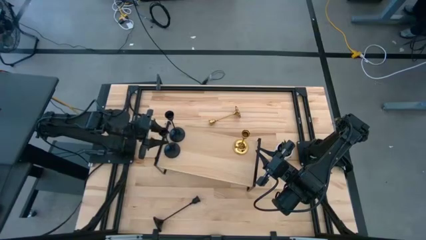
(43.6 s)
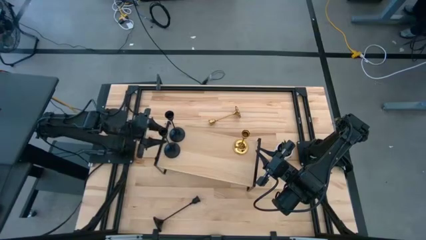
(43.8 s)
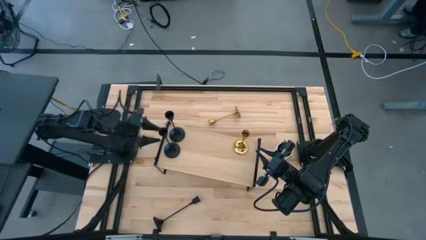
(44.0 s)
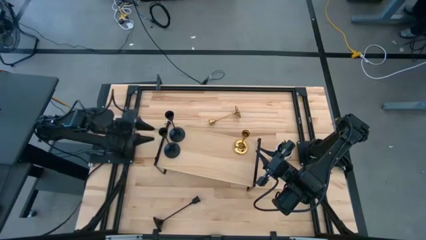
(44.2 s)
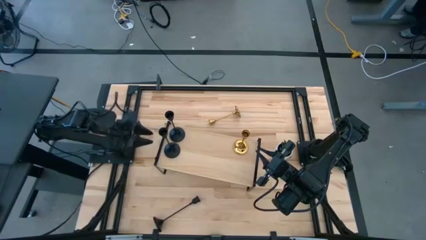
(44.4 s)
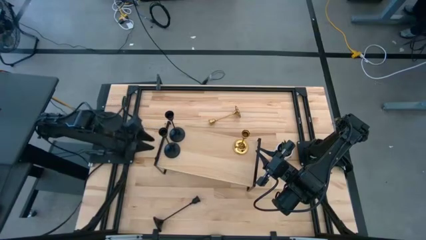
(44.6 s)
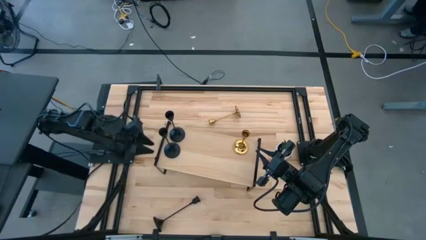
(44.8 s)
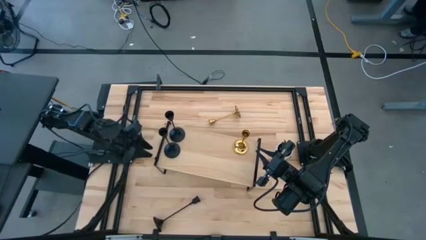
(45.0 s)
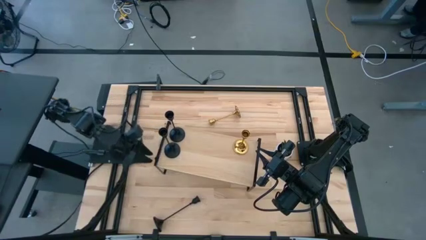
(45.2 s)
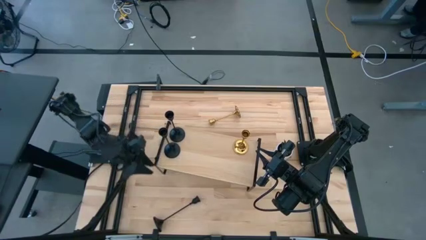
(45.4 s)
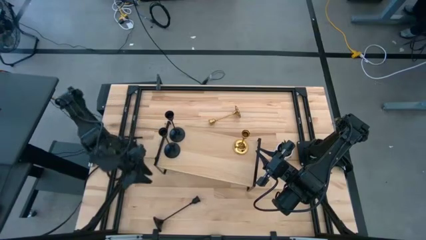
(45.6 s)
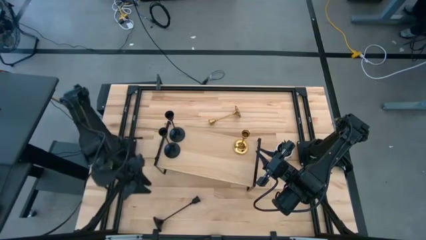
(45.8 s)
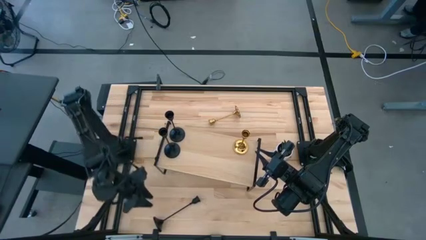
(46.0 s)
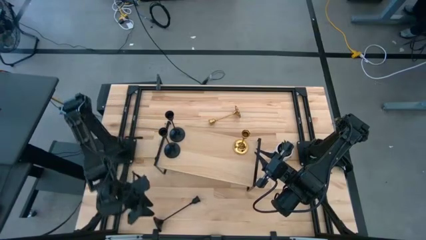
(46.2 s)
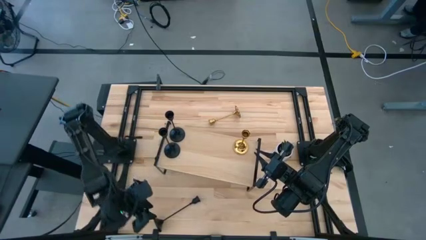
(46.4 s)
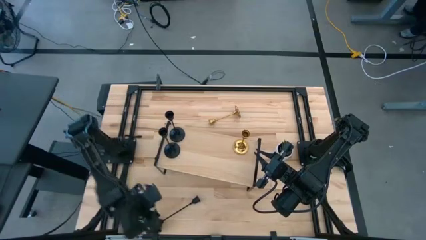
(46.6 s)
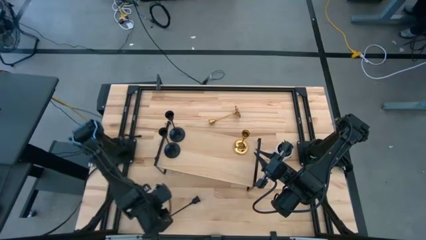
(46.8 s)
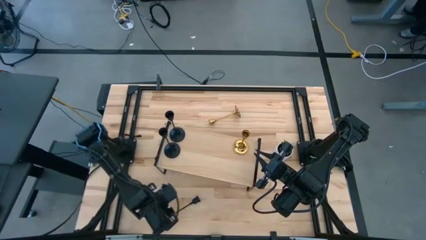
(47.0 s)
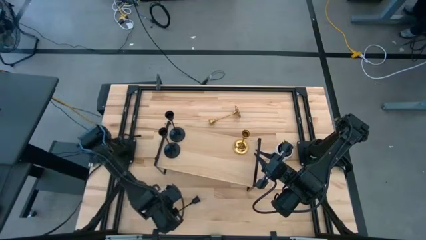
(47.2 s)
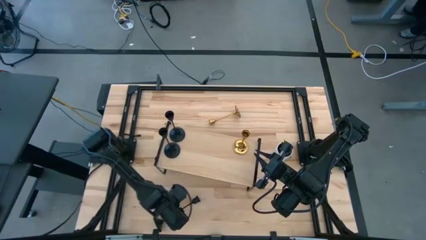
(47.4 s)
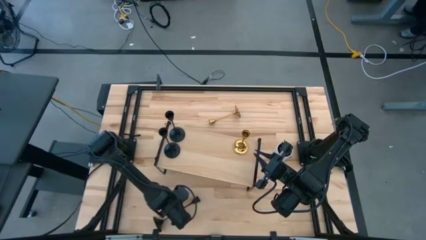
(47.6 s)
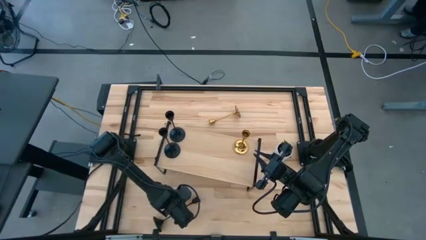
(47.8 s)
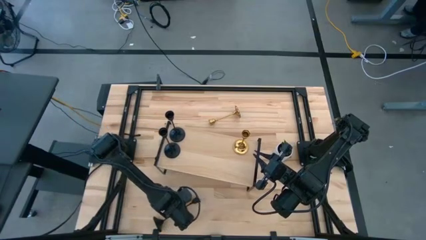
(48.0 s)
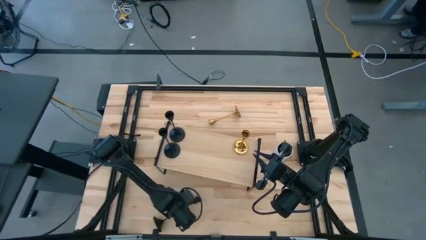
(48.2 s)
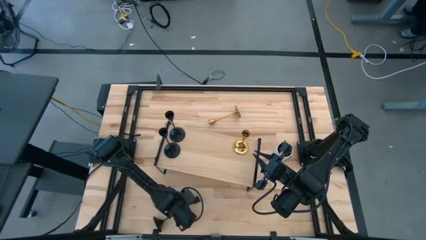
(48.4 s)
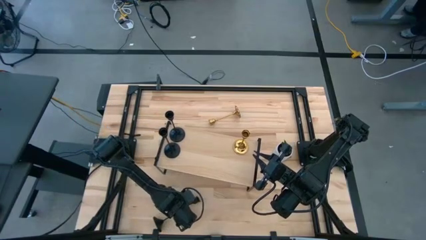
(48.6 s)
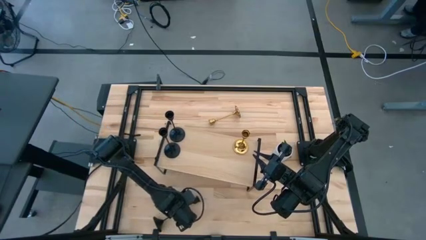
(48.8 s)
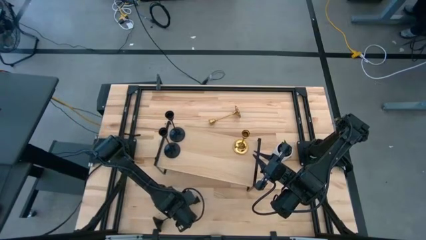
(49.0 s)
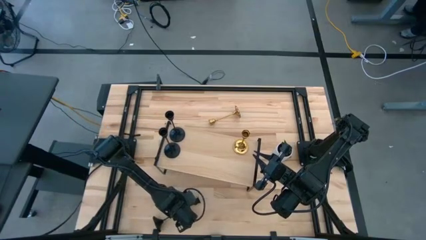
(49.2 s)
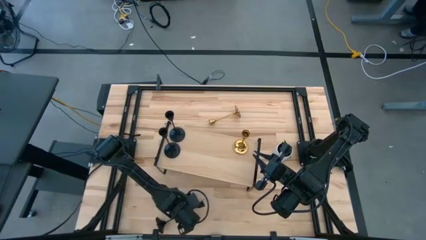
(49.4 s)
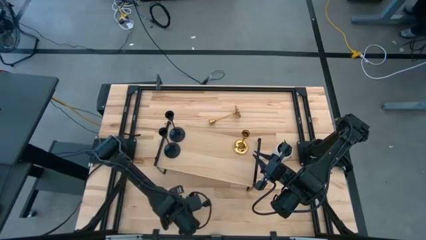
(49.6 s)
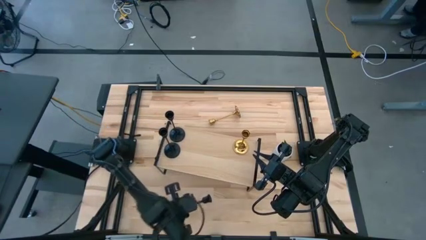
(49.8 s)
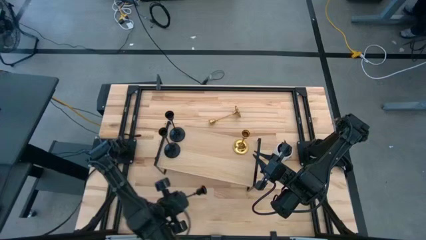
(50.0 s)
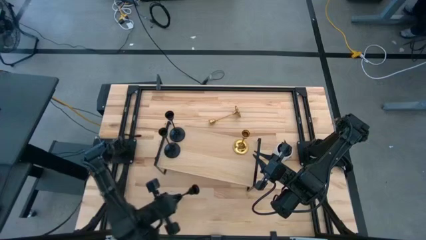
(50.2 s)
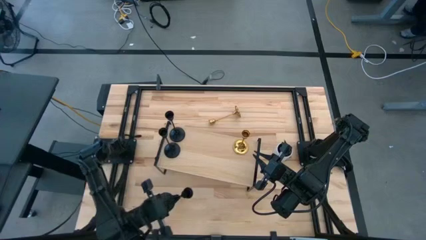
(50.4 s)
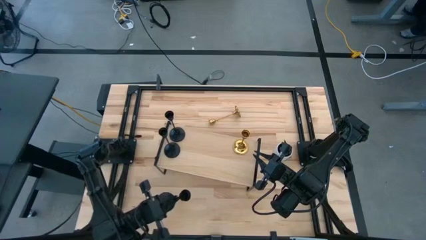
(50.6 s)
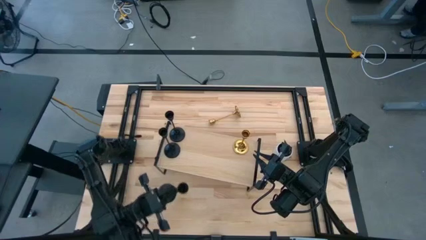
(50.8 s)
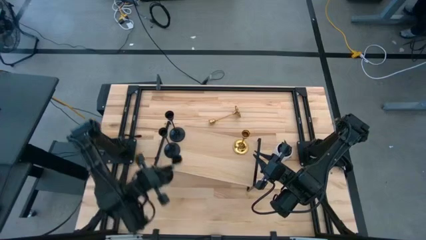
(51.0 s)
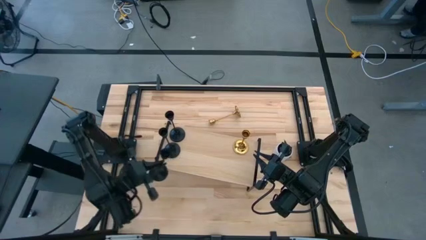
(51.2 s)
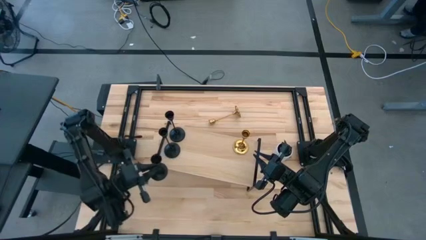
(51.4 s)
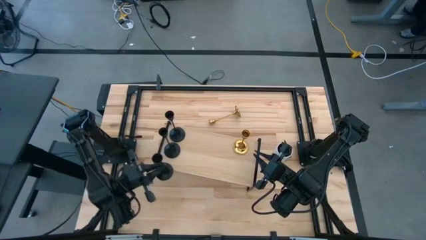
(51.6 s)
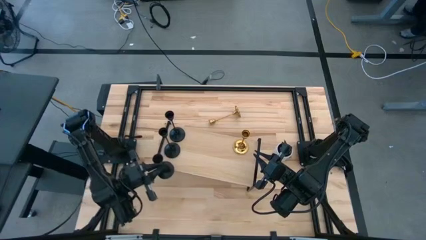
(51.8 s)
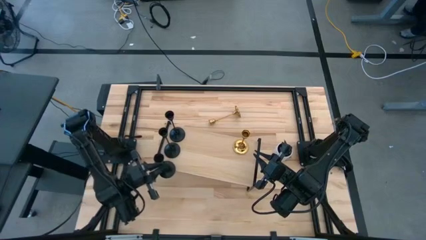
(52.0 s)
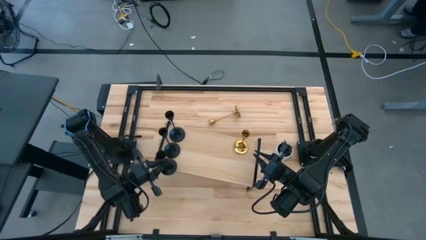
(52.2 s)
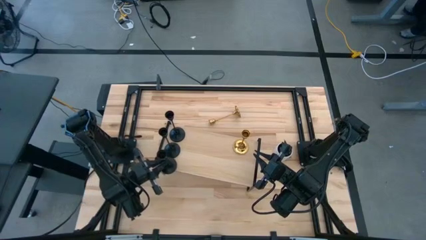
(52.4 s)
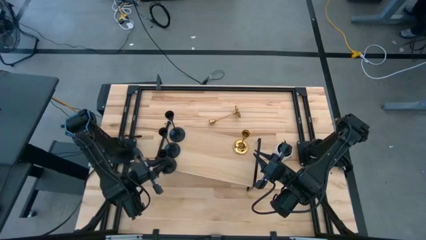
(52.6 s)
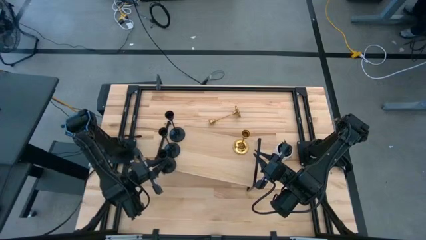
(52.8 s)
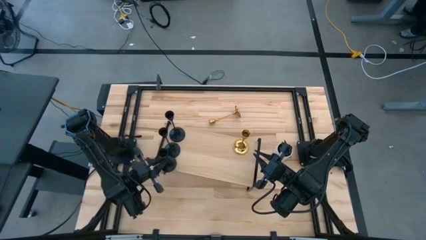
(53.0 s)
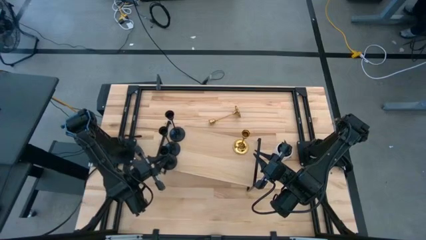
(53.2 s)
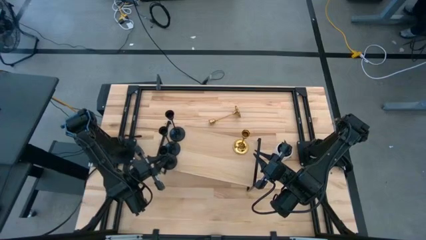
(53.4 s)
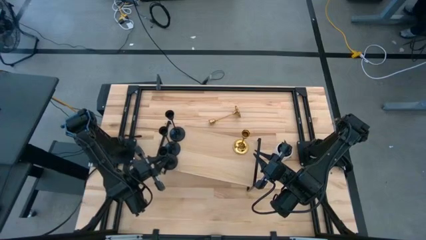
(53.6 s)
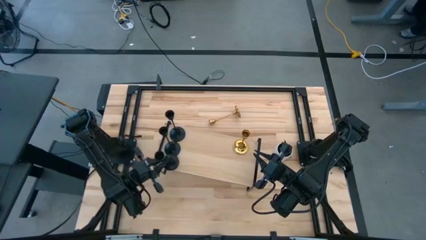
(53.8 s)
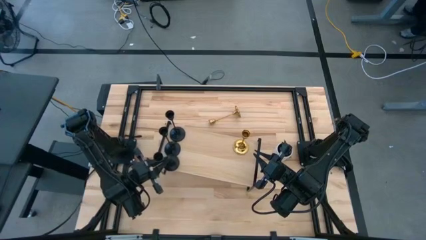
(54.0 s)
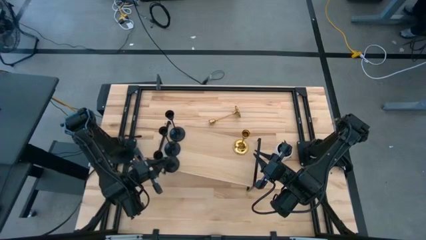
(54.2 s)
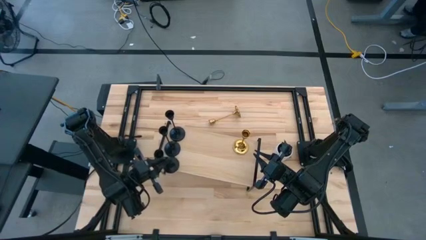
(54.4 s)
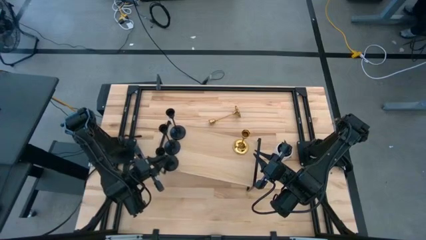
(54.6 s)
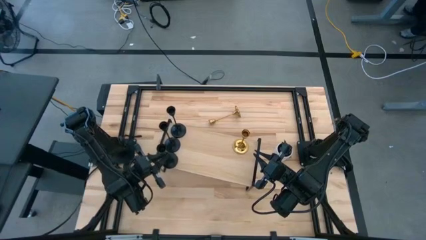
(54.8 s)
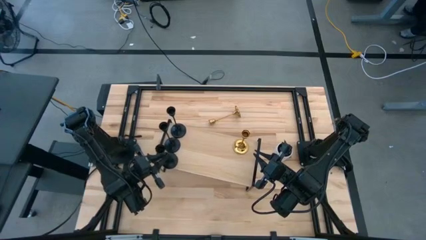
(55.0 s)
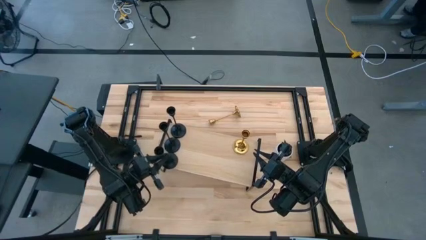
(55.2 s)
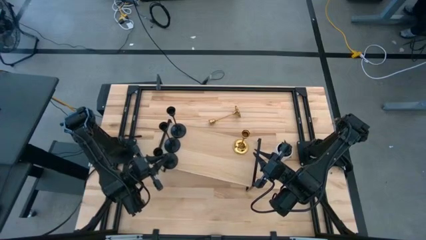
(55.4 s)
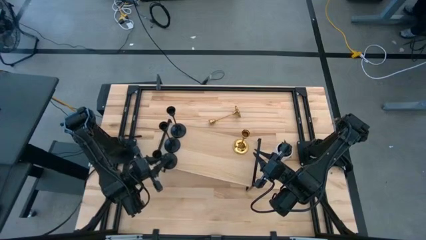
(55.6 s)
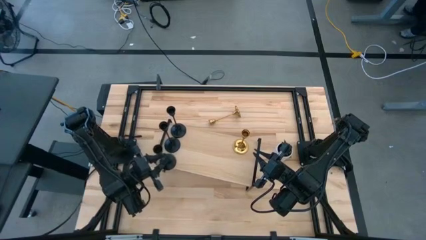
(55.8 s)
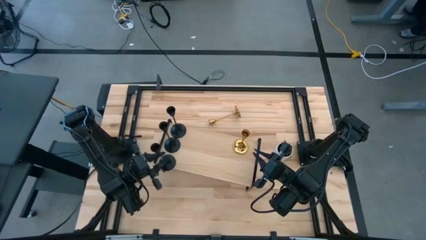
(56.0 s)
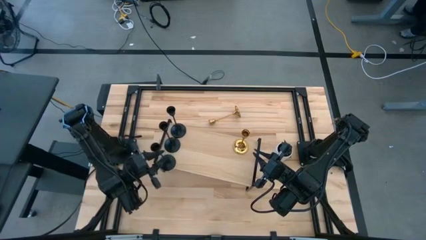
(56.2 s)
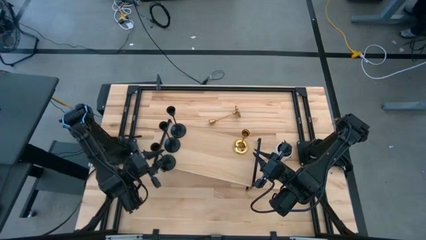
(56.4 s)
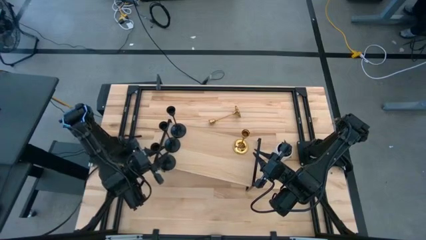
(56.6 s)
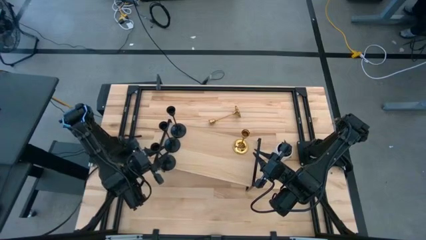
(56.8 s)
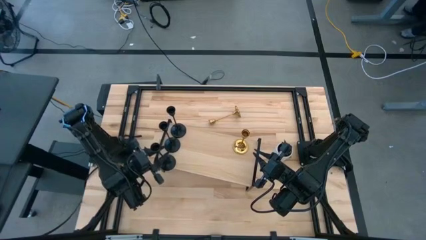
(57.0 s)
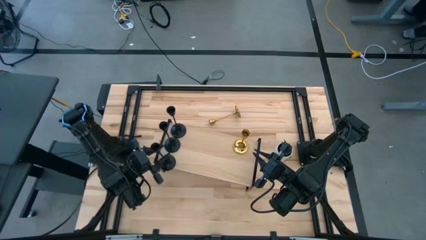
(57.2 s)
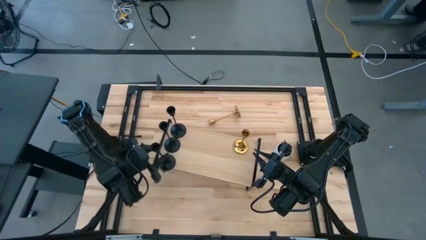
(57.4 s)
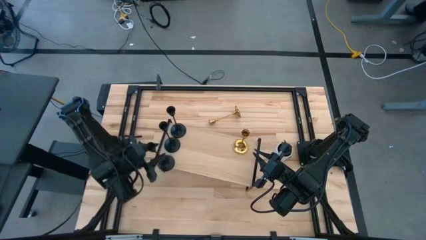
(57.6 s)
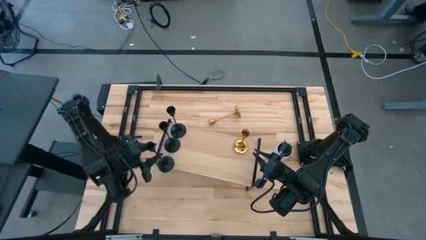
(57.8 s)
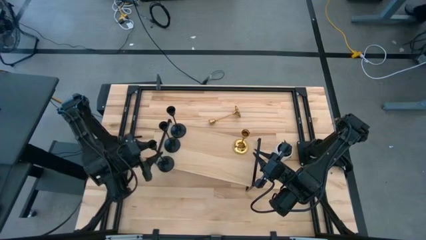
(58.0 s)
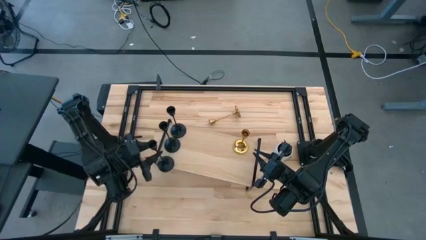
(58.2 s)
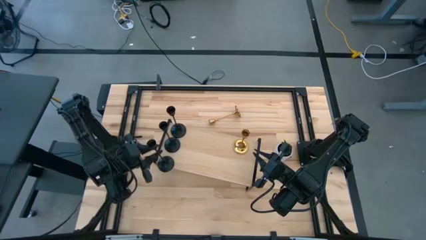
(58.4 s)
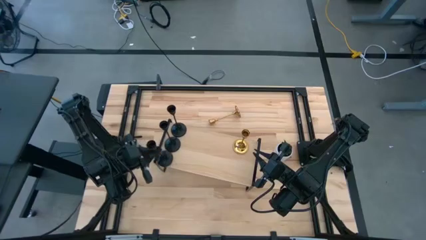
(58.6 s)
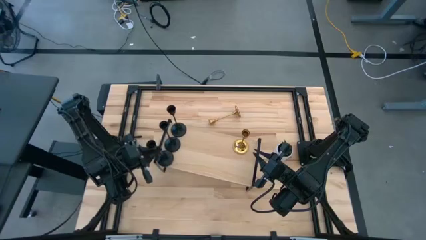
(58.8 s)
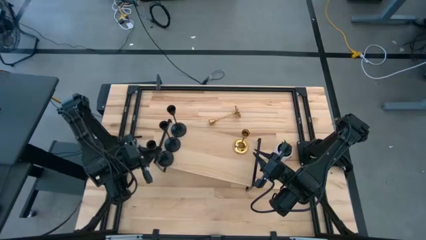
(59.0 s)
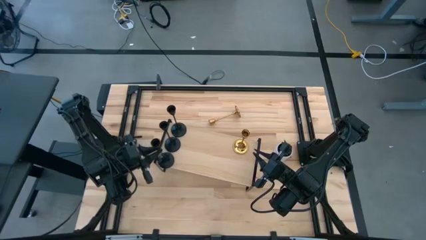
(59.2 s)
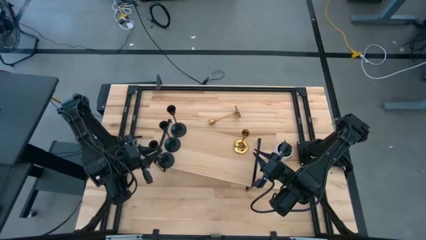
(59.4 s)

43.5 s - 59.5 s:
Task: Pick & Place candle stick holders
Put the black candle holder on the shelf aligned with the other black candle holder
